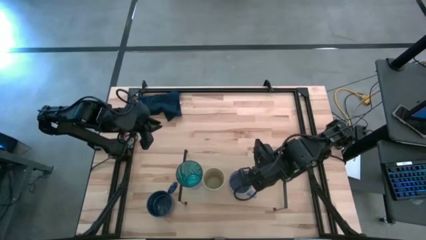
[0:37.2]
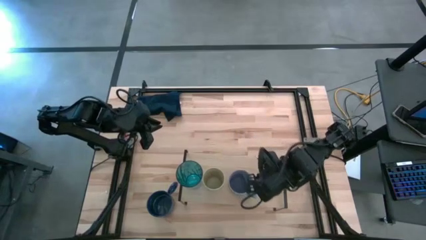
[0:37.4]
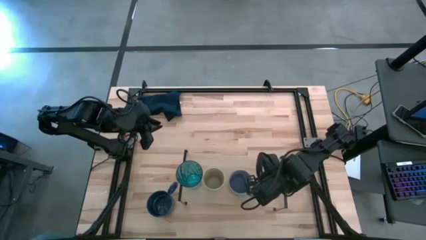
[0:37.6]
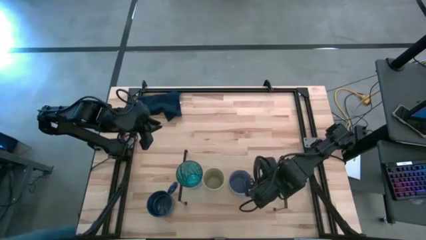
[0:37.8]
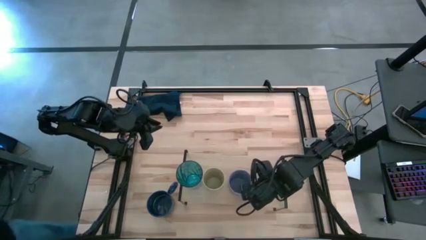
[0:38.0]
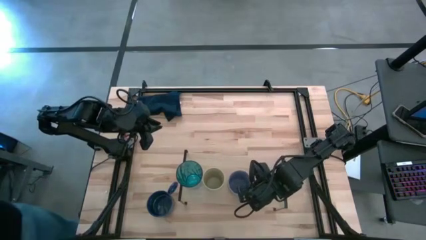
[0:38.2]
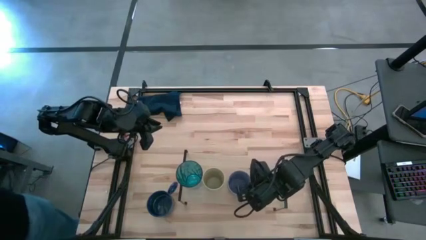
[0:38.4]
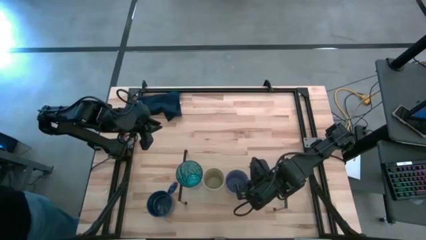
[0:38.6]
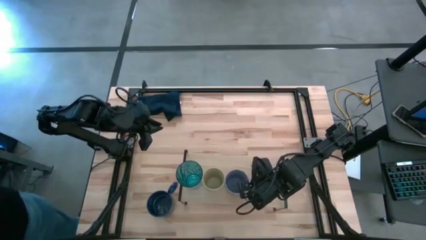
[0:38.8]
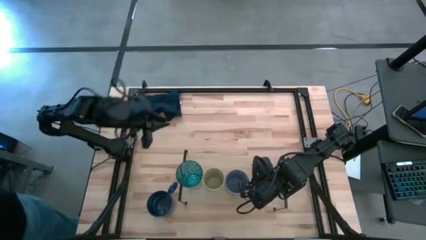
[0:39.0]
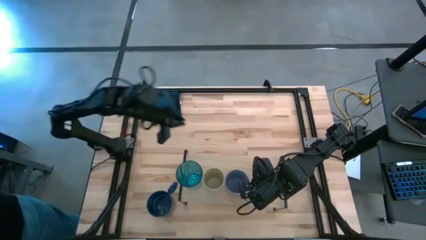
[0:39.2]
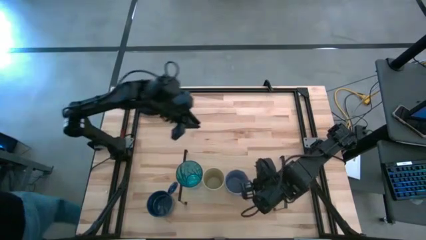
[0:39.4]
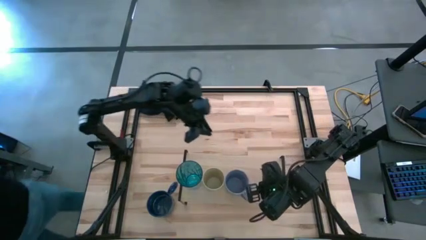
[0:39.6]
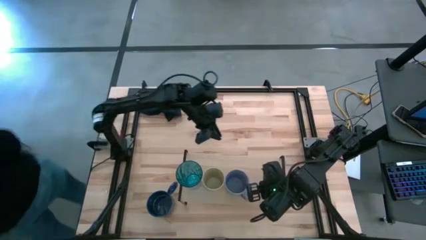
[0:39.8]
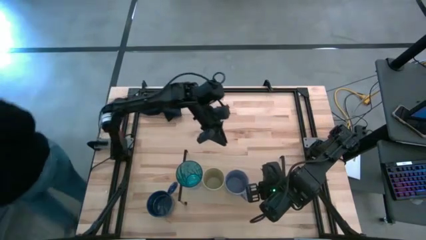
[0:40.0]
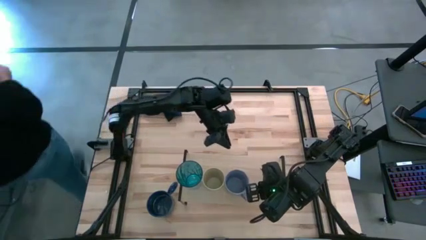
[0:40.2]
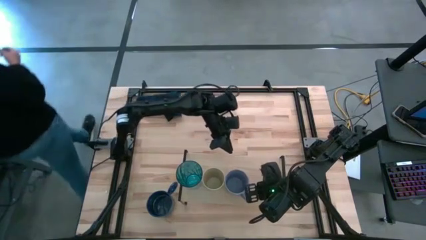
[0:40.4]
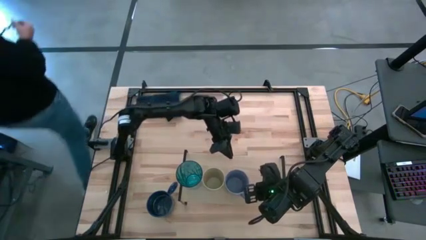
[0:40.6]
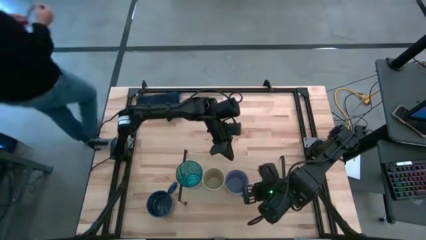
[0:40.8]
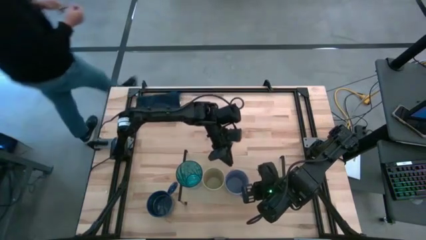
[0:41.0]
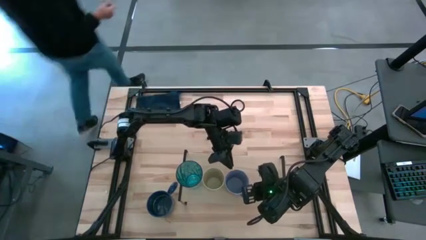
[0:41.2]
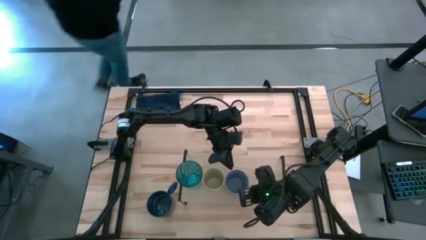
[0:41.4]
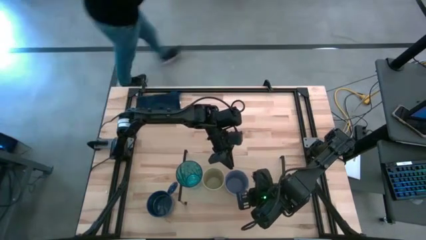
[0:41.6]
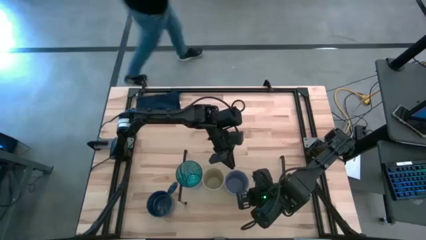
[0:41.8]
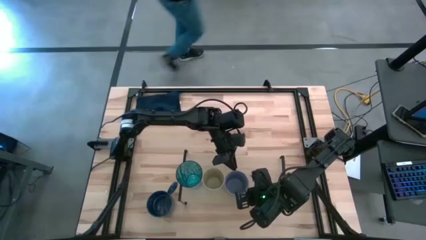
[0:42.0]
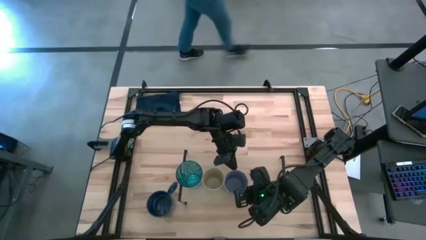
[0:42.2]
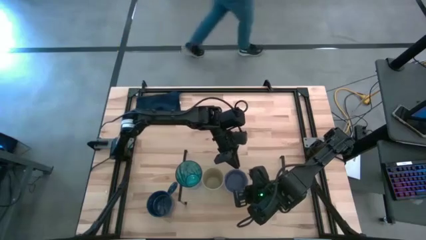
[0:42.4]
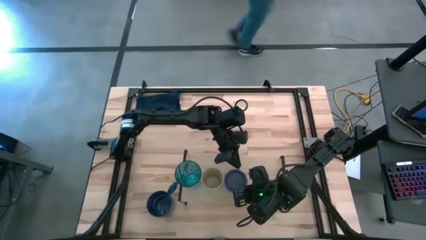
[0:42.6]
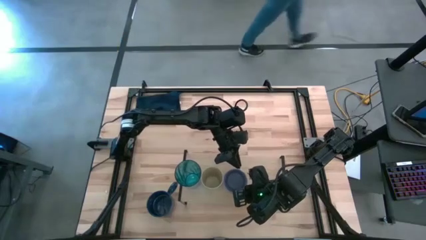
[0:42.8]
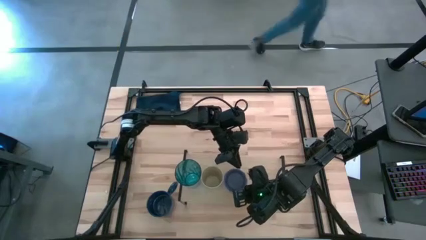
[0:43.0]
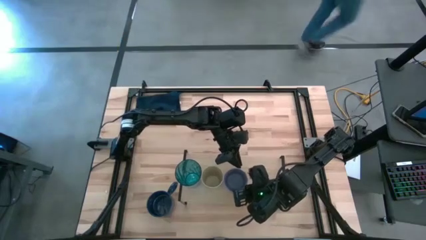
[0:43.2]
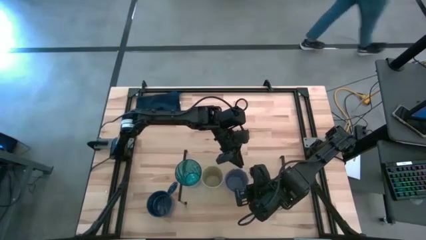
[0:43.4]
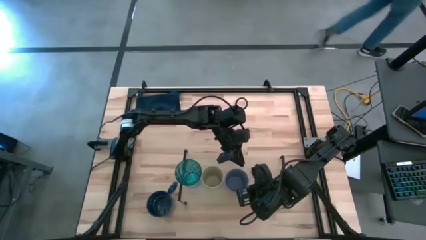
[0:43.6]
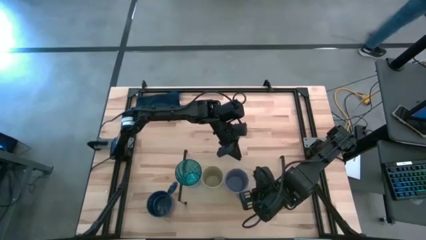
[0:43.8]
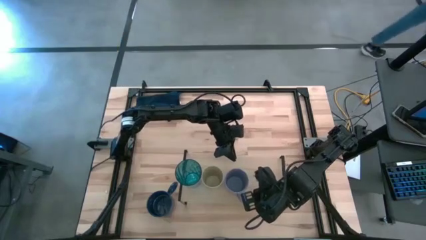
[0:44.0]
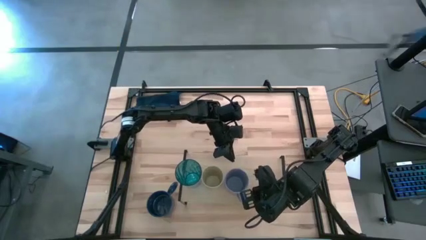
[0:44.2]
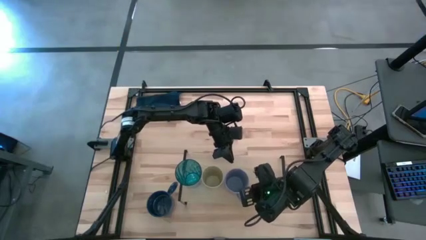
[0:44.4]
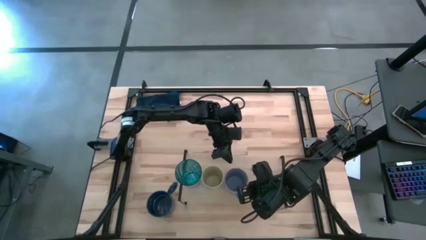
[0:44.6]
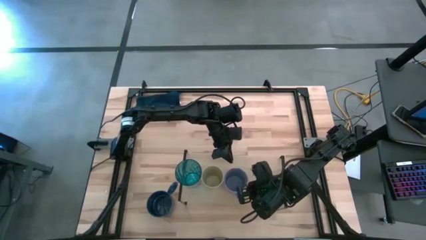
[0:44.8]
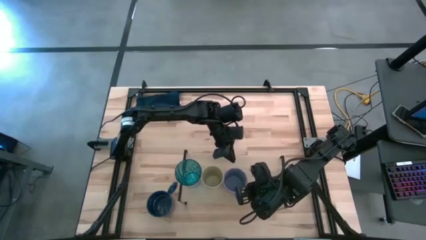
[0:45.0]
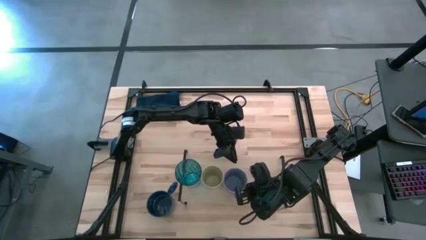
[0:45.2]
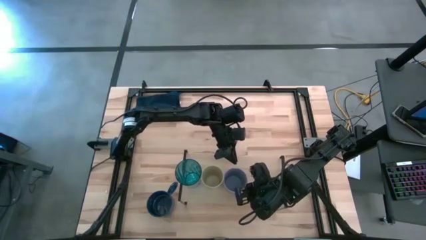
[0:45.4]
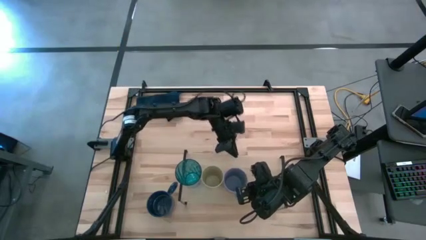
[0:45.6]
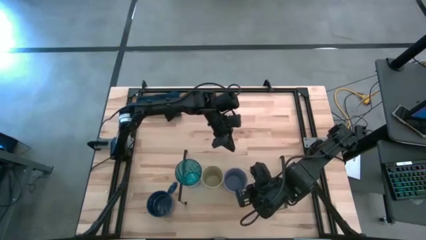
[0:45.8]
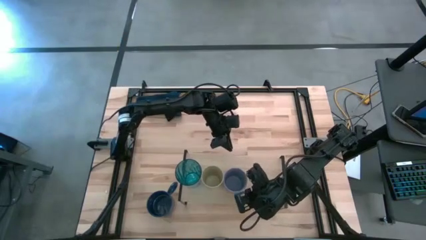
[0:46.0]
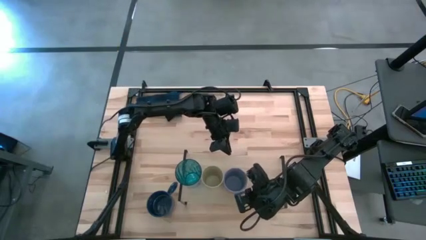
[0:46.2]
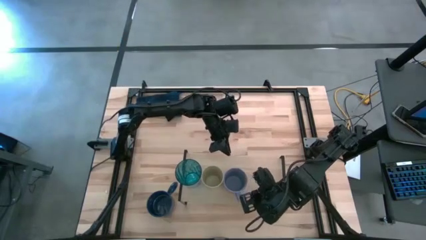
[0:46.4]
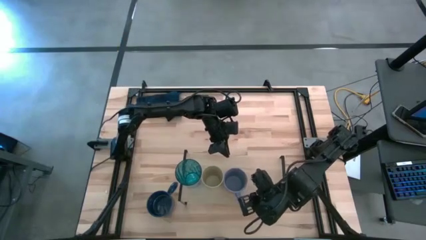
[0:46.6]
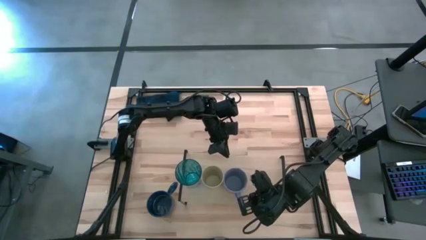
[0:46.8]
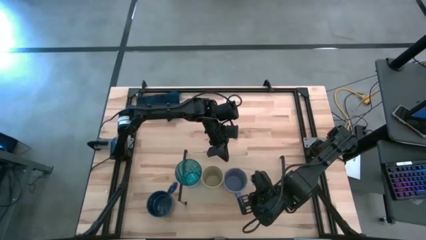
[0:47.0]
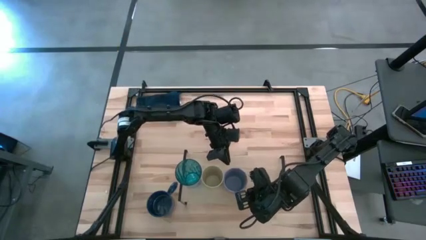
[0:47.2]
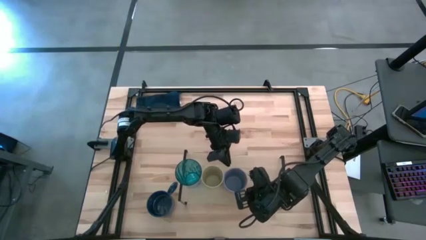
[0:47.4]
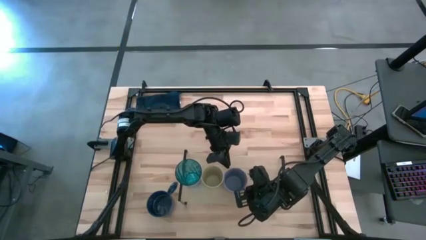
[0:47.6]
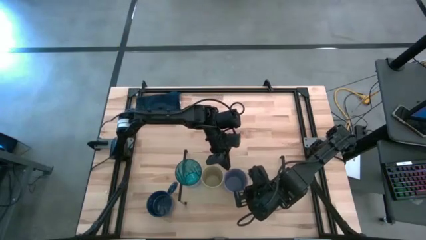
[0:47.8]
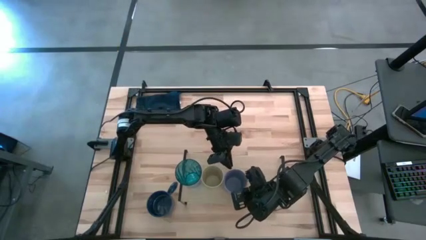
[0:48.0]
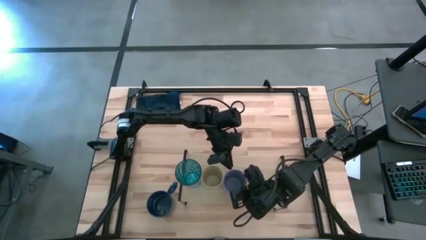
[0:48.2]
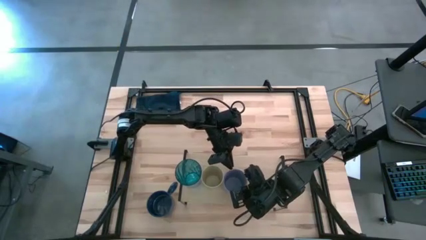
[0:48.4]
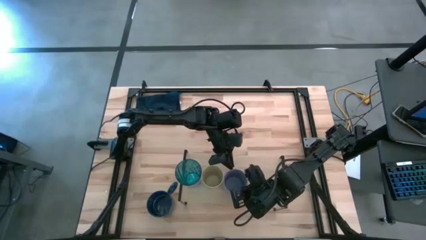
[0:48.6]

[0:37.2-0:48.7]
Task: Stack small to large cups/mugs on shelf
Put the blue mug on the shelf

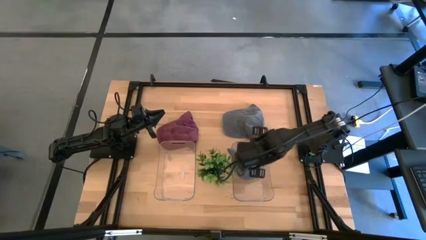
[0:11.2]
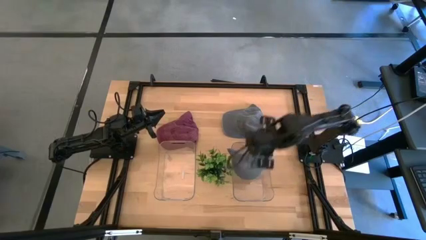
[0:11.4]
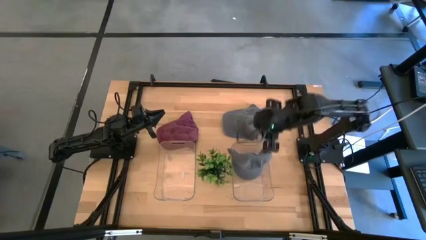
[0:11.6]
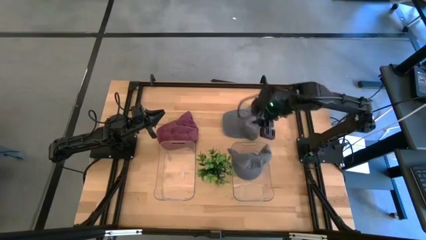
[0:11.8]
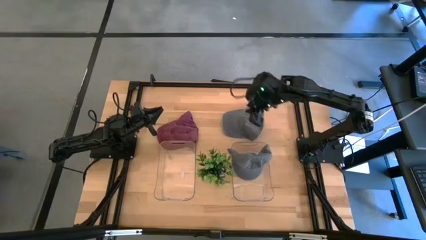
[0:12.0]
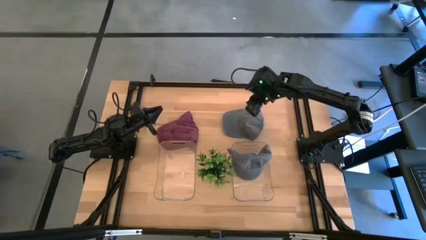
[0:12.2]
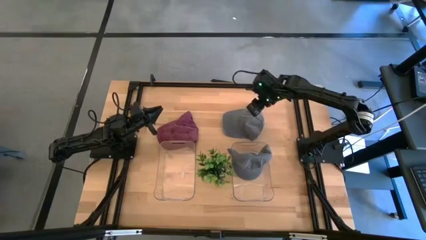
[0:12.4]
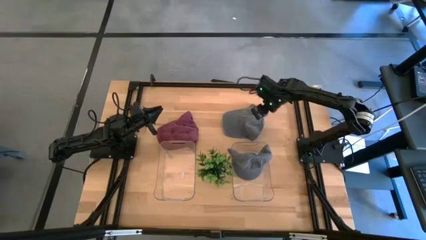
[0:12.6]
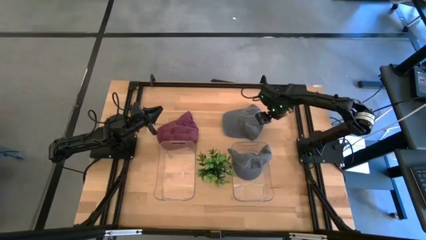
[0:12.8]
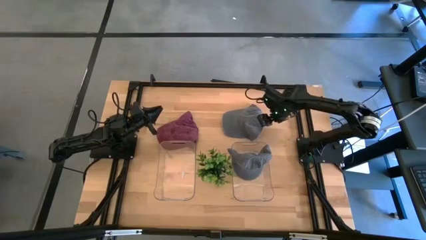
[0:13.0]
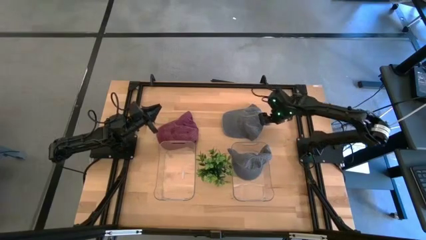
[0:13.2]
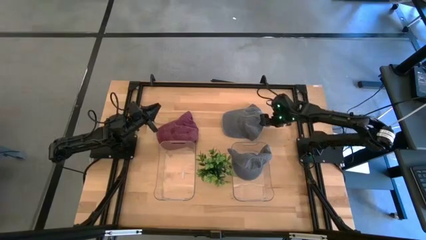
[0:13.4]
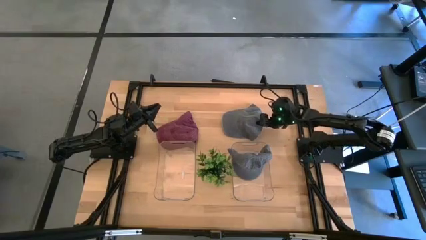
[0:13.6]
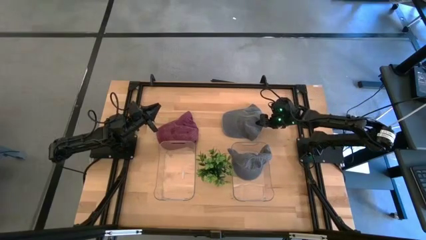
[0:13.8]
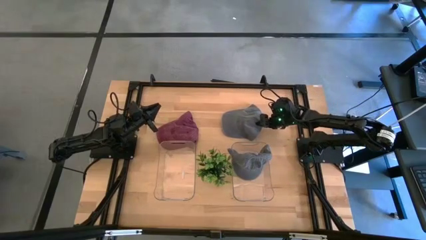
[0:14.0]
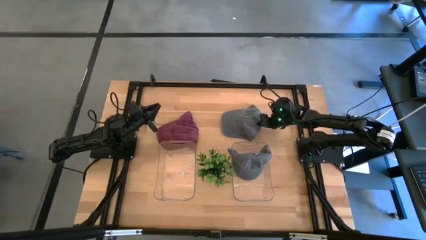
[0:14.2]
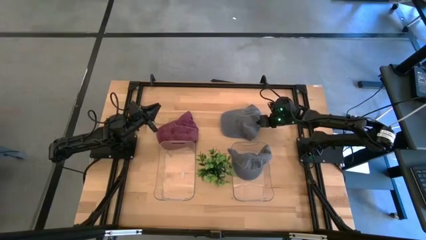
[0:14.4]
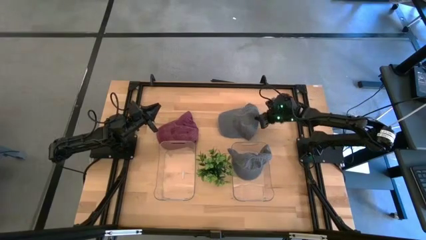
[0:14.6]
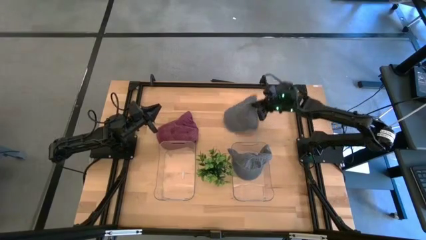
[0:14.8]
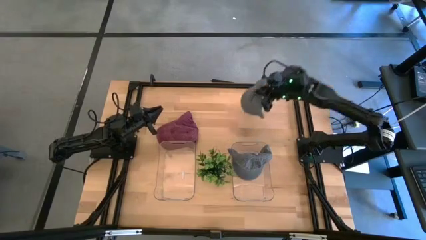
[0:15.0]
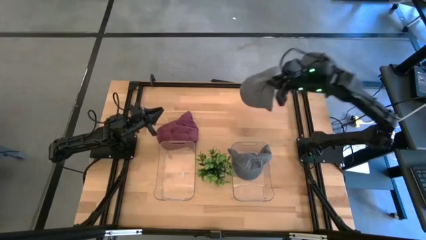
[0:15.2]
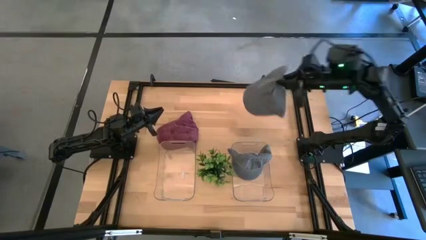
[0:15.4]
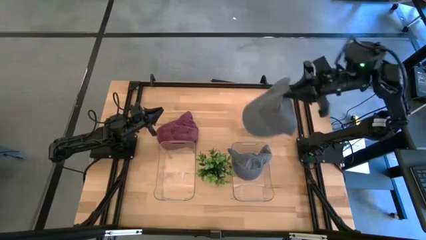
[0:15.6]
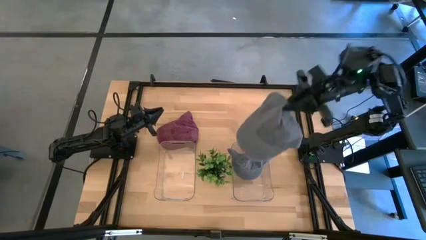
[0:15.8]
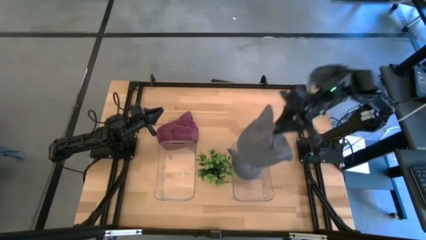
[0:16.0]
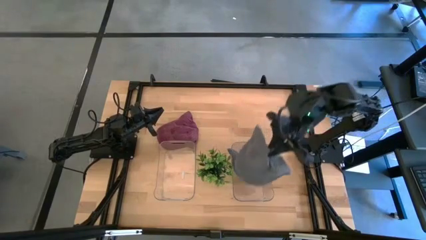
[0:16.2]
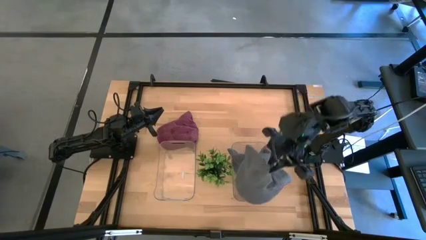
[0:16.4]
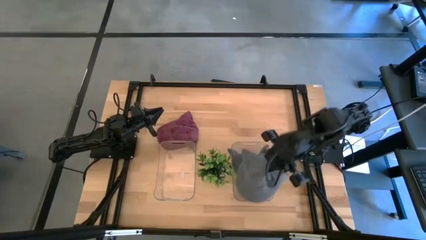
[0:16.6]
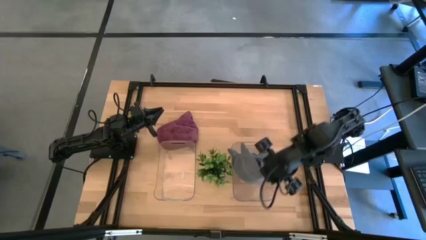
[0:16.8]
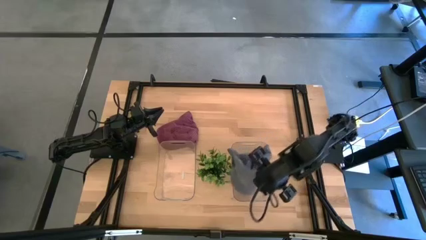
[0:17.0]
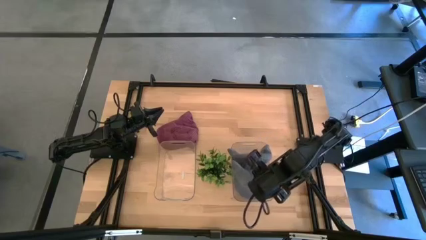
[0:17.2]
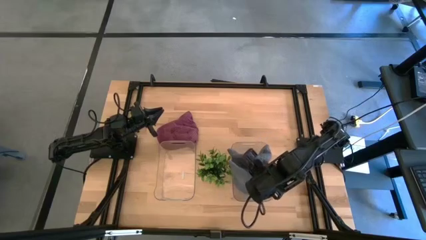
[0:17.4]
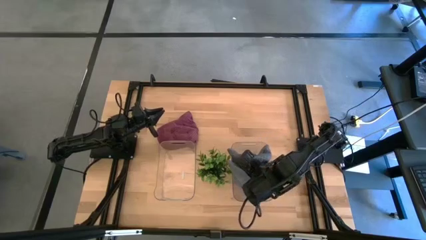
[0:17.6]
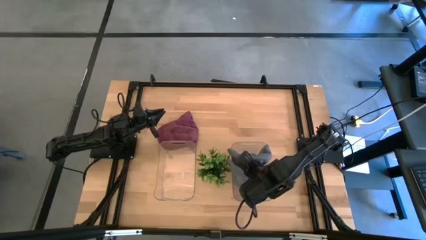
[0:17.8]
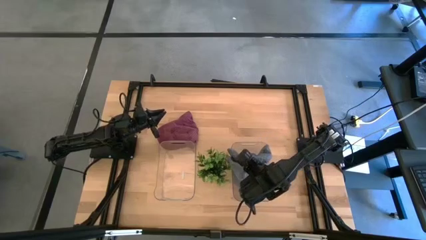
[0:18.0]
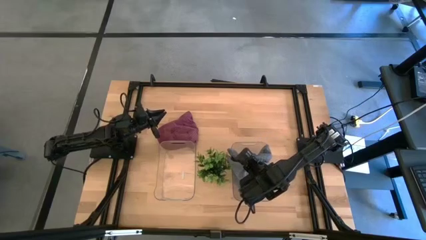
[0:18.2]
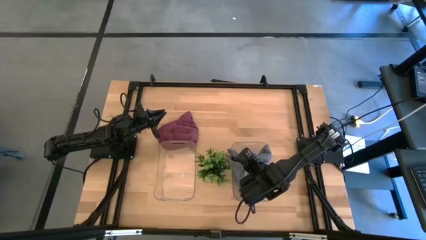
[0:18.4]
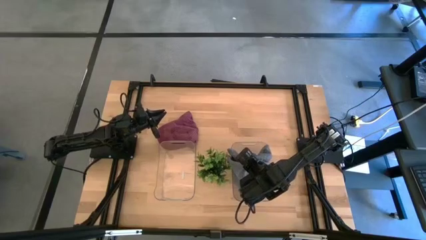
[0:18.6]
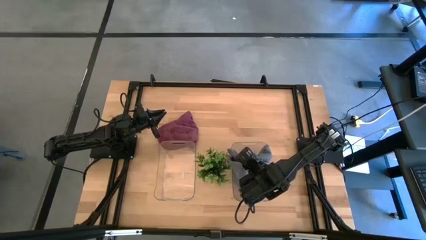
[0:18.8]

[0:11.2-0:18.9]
Task: Pick & Place hat
Put the gray cap into the right transparent bin
